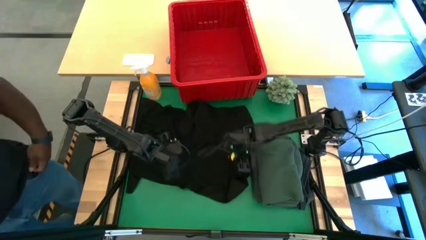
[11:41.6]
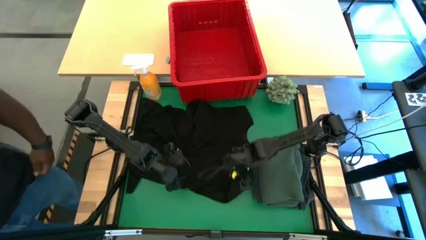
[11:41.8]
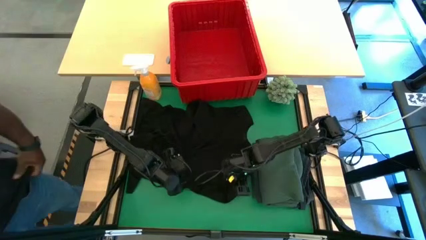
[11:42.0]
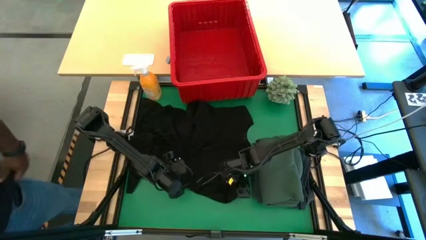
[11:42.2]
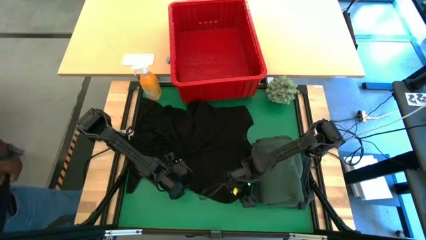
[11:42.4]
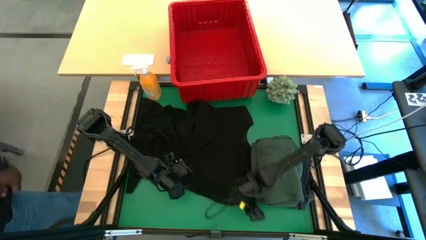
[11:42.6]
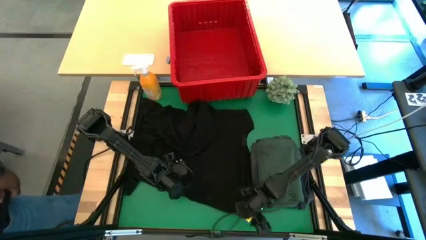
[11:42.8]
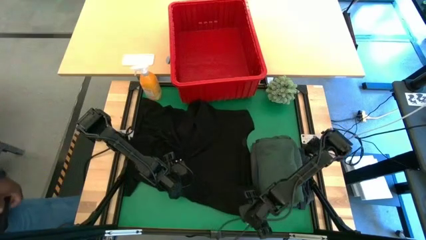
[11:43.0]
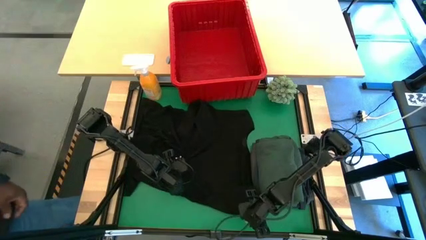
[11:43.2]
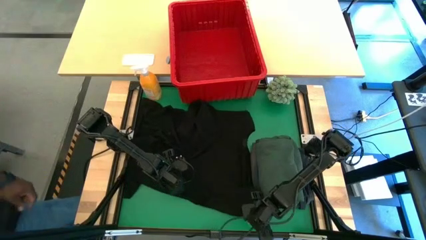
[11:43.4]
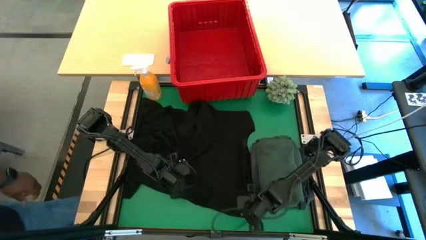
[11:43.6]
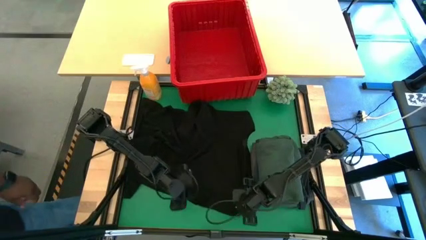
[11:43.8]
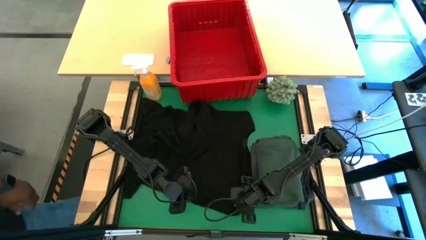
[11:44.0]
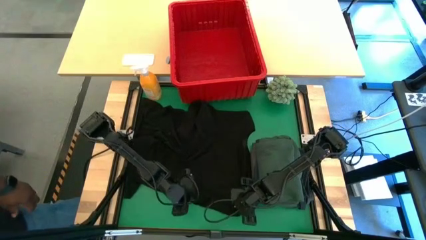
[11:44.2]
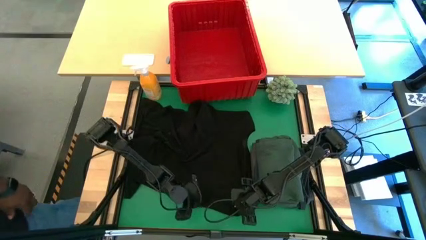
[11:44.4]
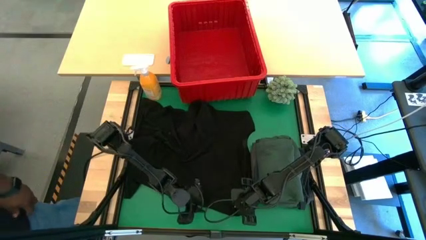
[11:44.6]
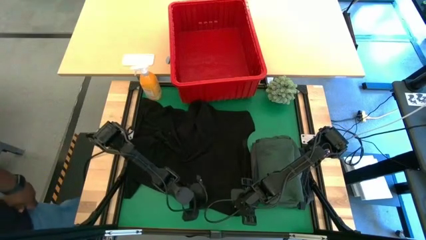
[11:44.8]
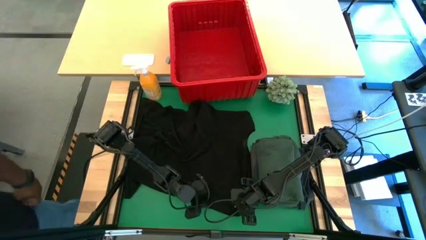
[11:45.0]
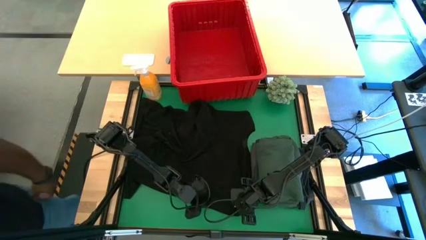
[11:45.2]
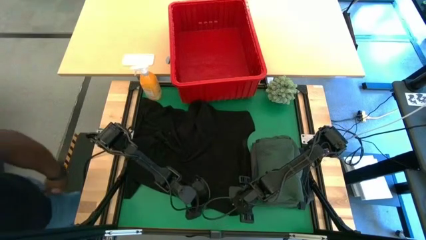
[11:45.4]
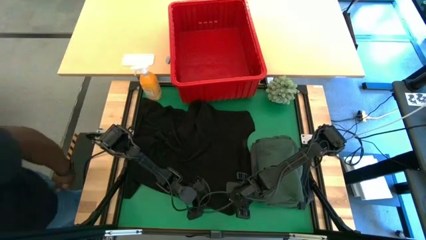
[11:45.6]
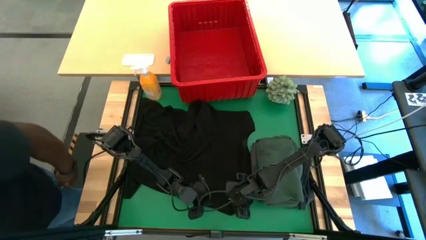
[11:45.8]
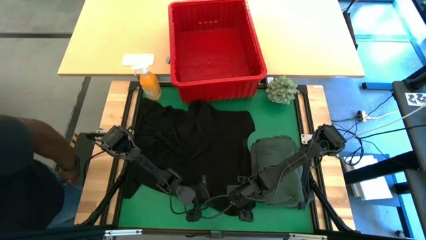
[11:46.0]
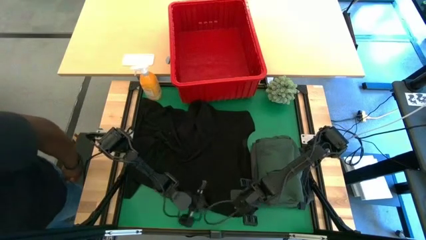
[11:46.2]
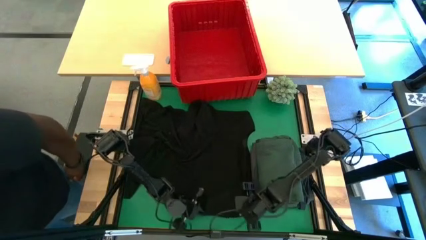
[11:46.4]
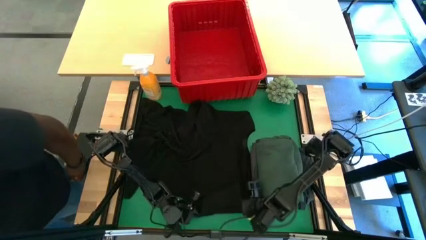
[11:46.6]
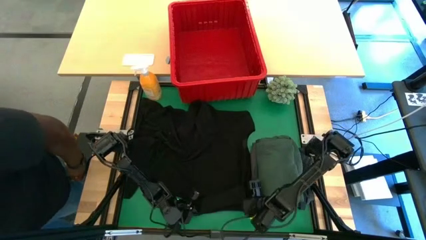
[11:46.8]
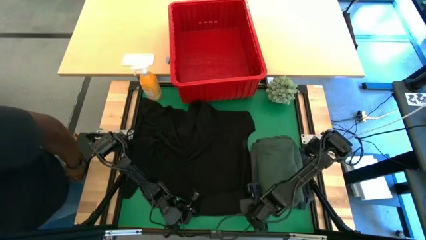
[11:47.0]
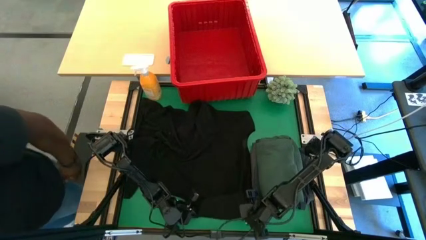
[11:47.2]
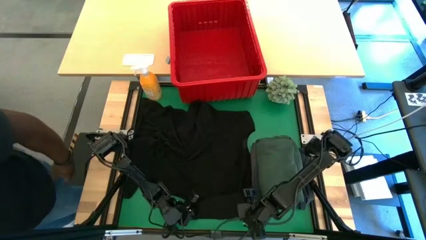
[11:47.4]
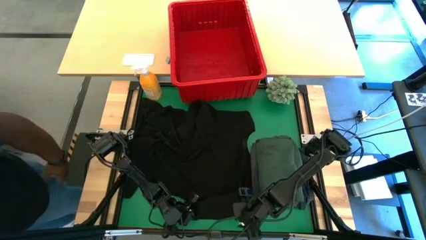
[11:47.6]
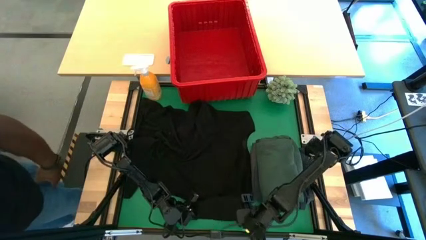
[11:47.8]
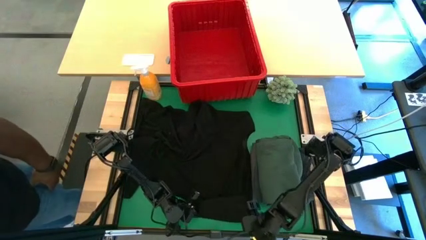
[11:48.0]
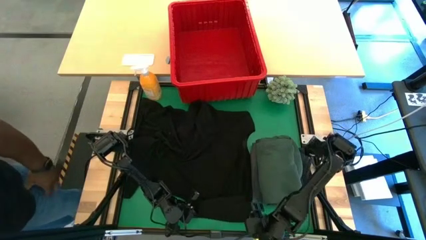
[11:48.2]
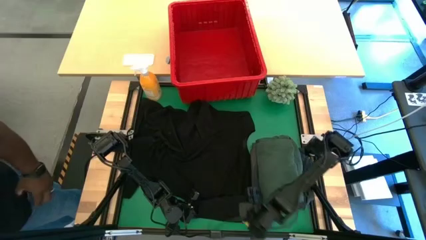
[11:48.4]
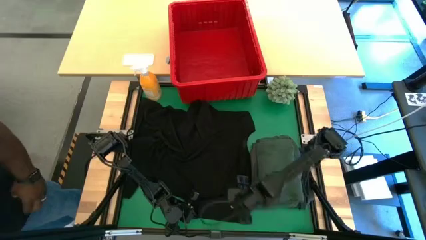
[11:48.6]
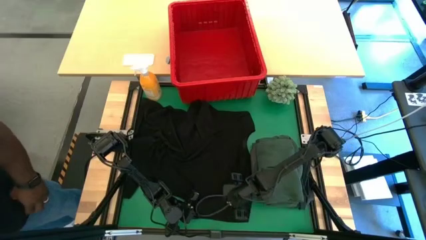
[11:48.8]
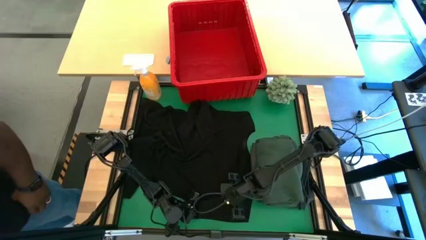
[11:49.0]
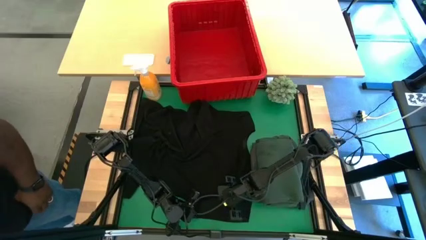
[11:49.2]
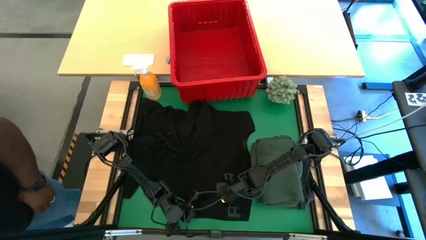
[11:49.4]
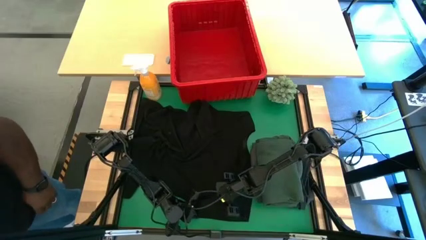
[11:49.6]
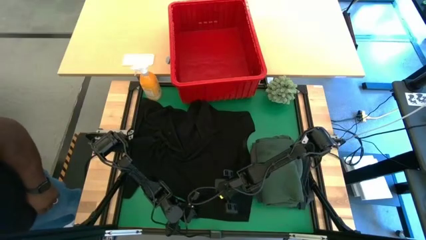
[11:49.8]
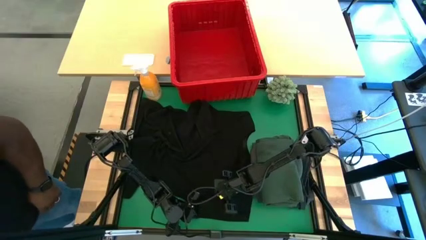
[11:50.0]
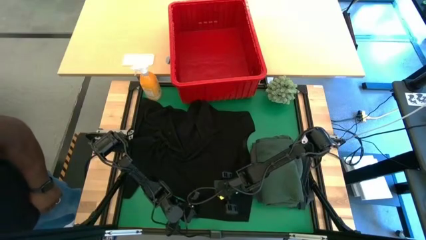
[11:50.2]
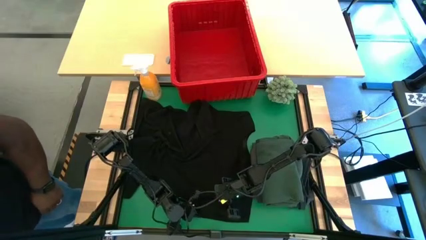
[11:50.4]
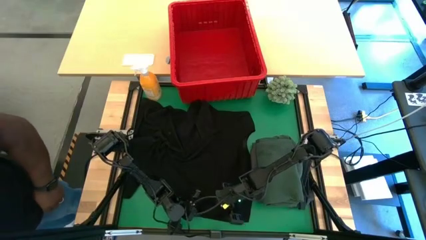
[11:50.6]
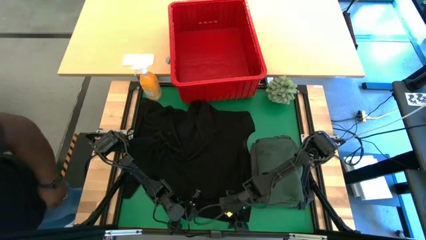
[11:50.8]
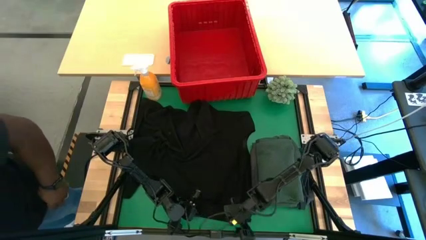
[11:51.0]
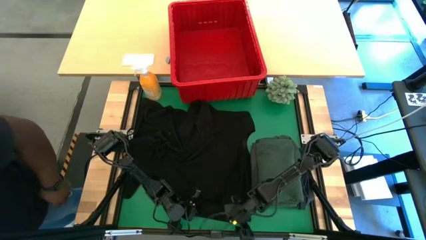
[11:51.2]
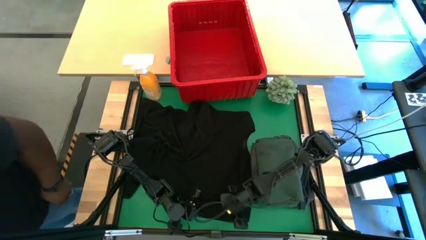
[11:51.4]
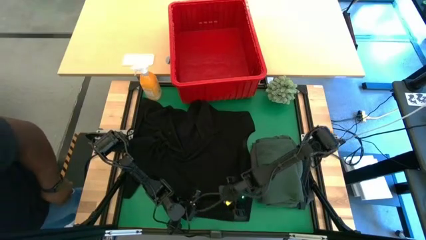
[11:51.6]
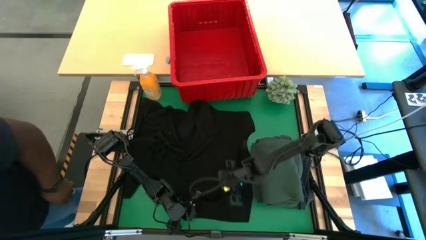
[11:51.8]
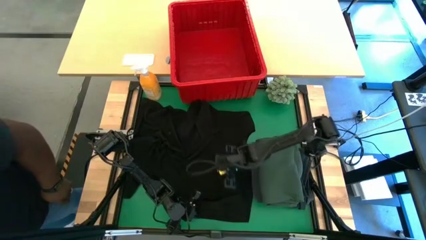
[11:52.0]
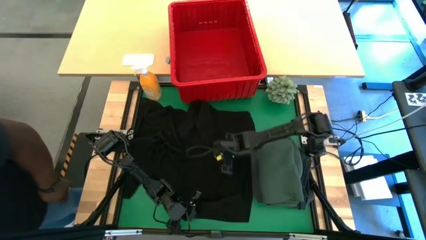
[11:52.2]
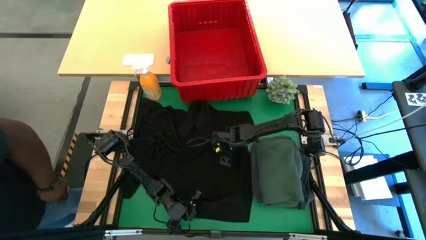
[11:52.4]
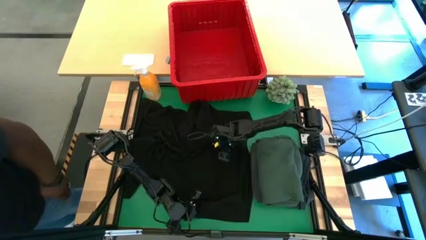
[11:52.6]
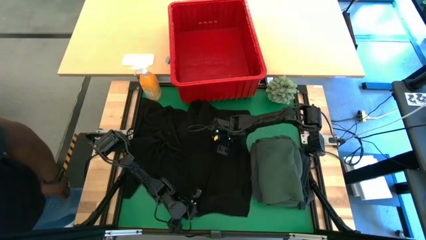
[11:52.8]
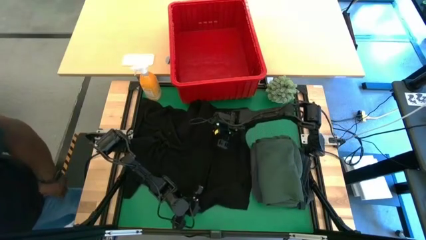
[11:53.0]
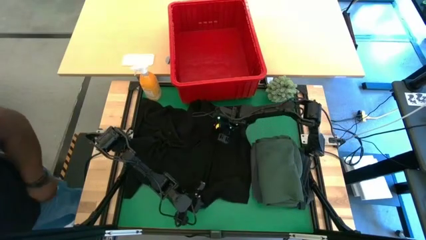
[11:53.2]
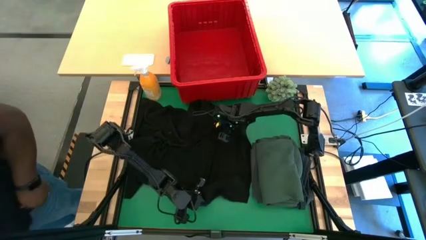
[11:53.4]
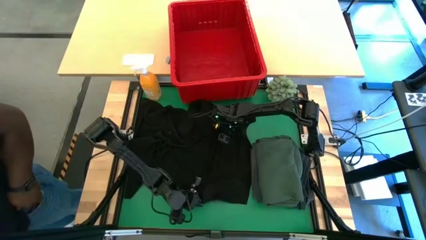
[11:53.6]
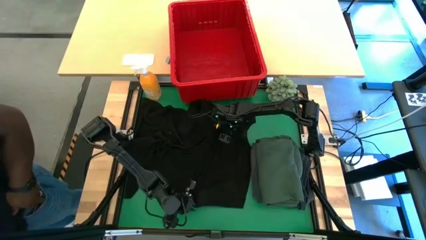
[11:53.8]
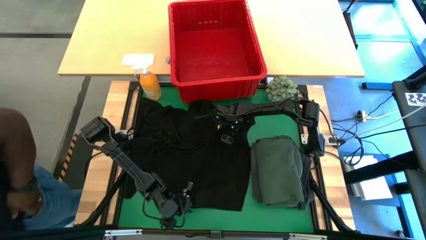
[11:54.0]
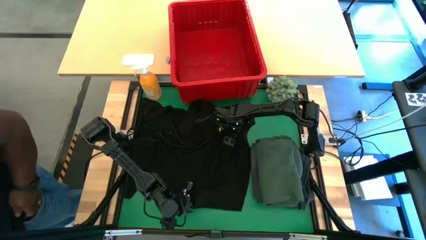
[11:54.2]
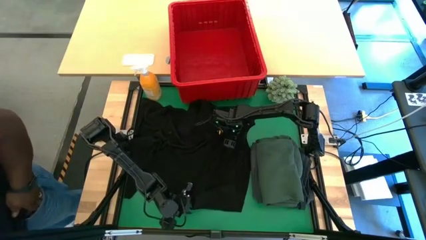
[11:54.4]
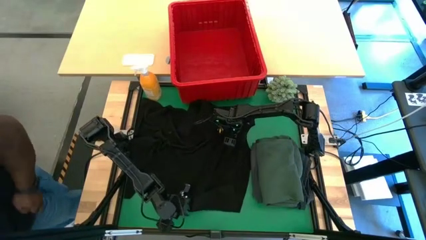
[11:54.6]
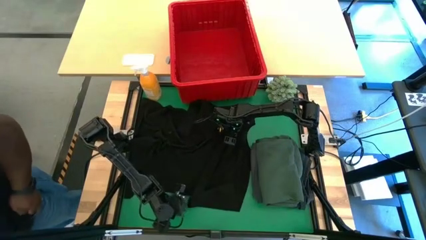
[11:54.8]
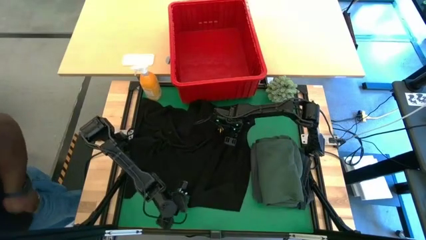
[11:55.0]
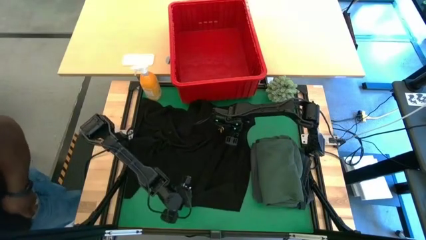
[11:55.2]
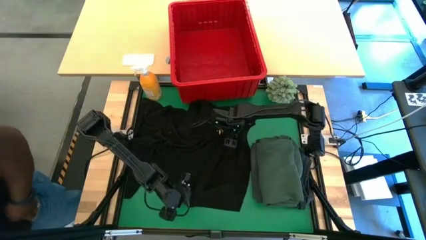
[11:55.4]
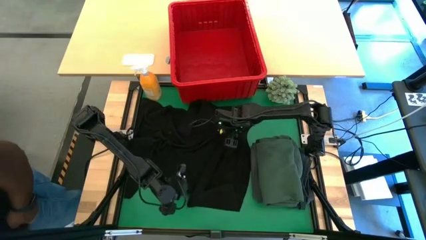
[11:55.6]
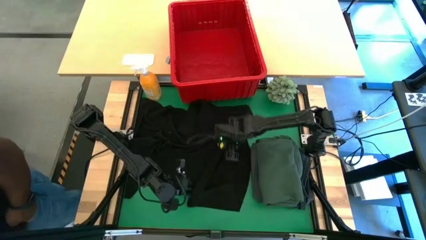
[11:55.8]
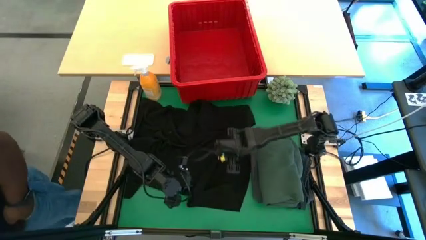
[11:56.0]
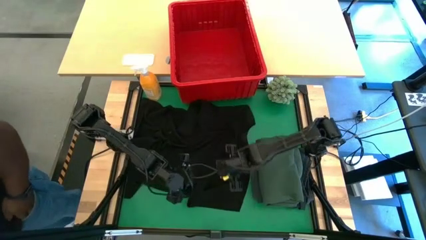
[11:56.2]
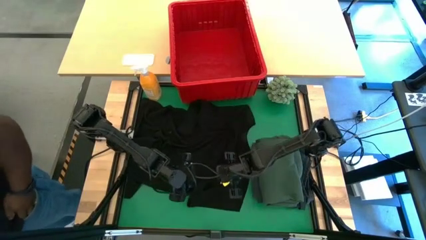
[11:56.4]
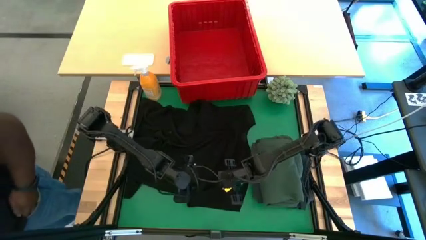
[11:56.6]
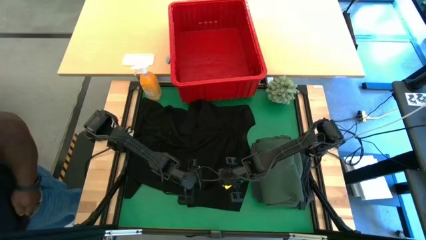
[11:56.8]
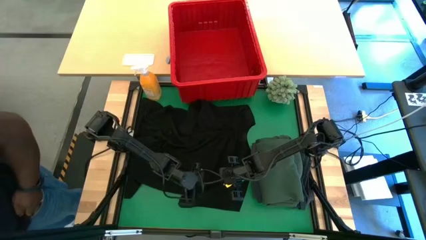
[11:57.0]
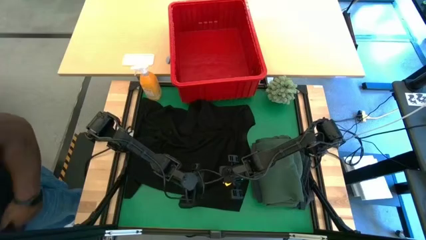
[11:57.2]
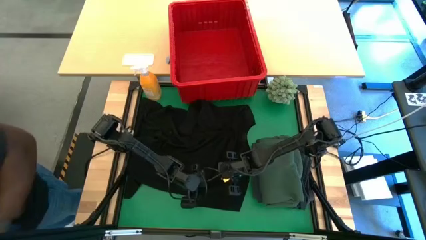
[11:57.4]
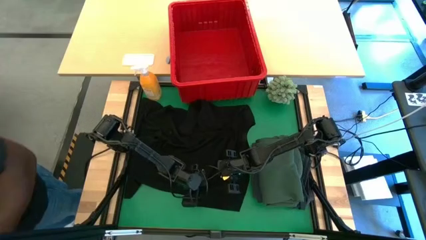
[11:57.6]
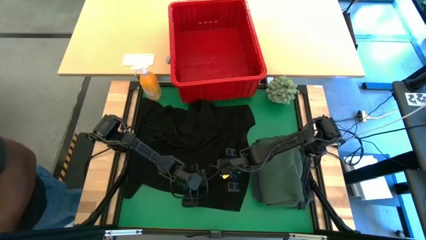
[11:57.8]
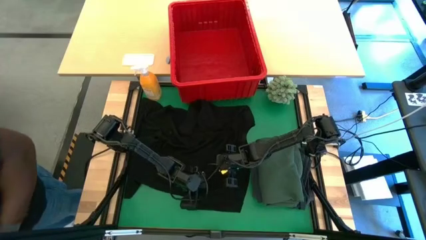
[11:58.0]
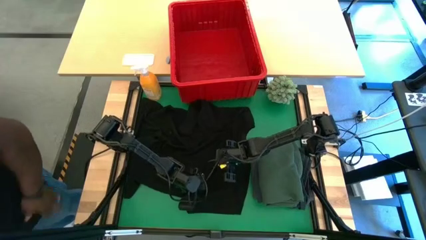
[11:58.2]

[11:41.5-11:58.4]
Task: Fold Laundry from Bin
Fold the black shirt
